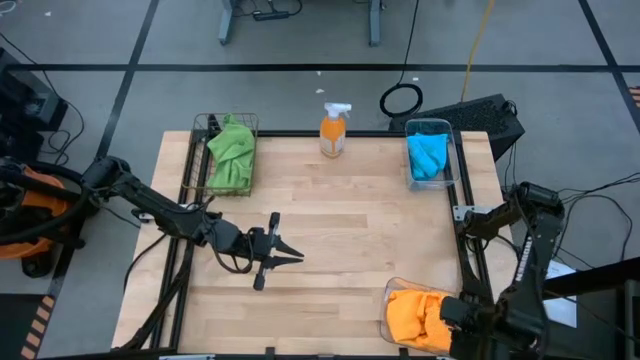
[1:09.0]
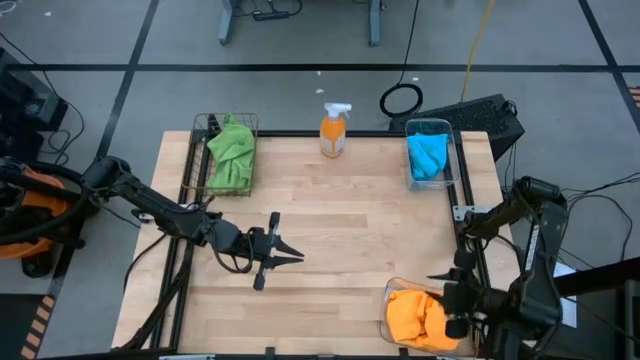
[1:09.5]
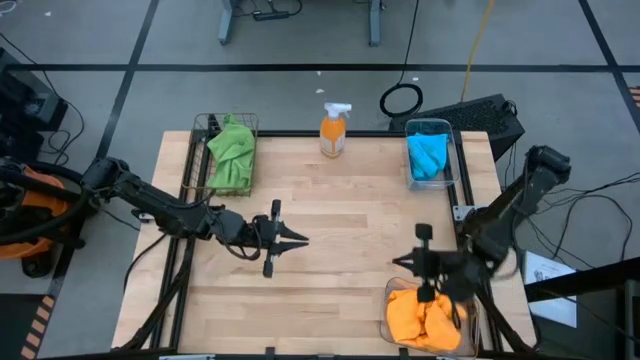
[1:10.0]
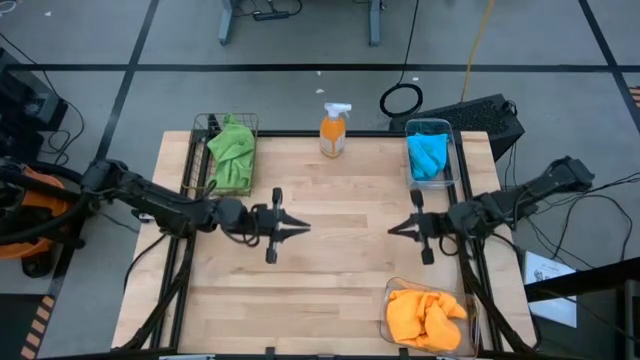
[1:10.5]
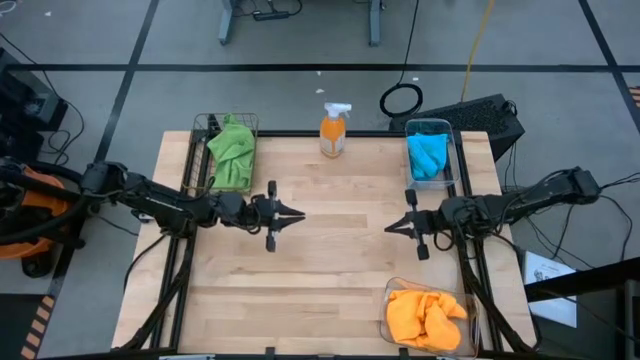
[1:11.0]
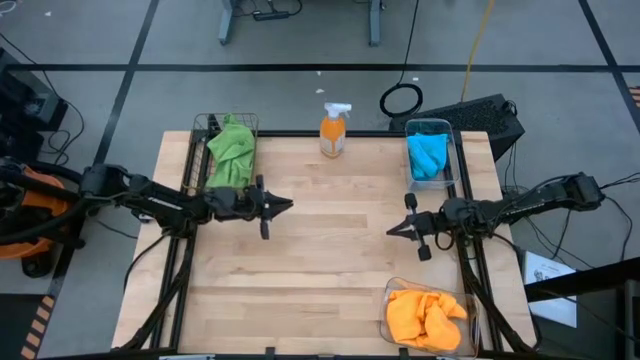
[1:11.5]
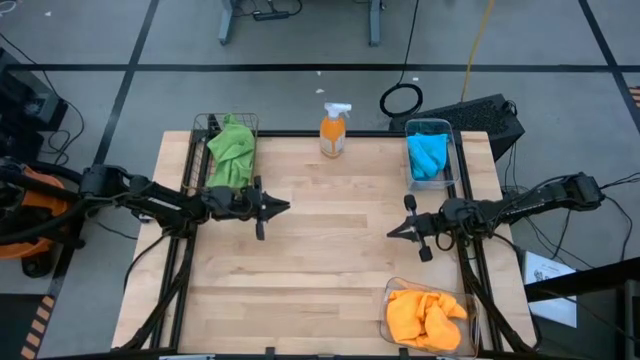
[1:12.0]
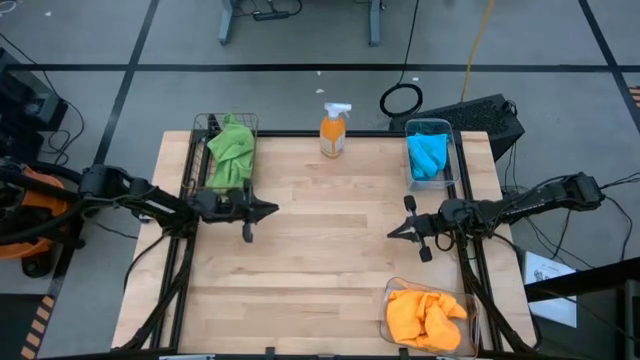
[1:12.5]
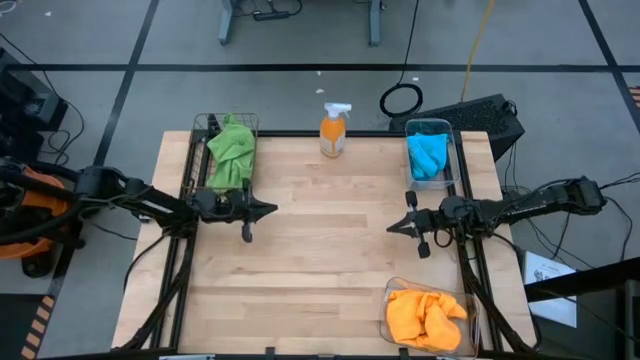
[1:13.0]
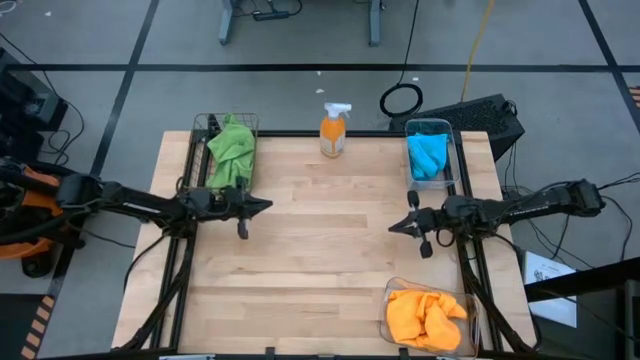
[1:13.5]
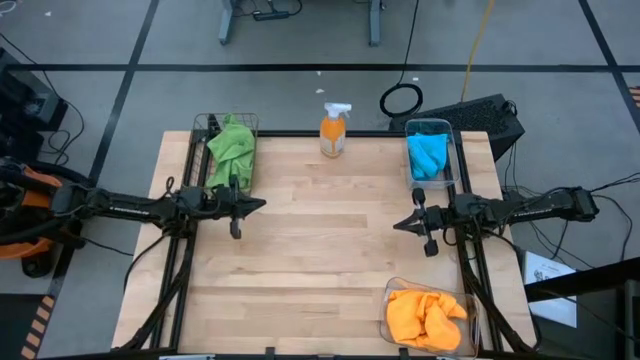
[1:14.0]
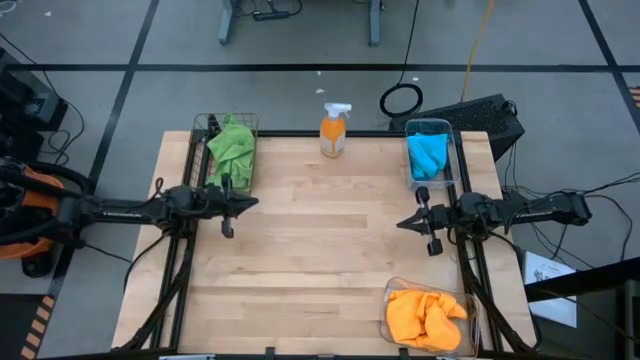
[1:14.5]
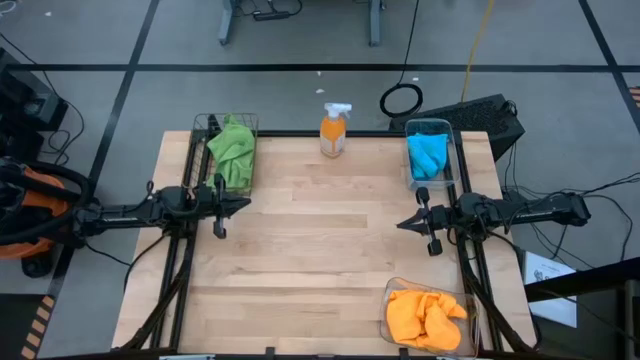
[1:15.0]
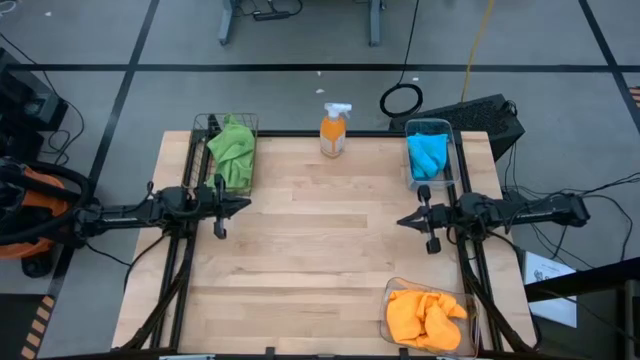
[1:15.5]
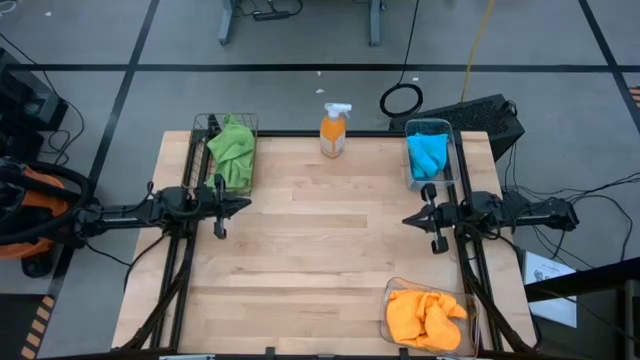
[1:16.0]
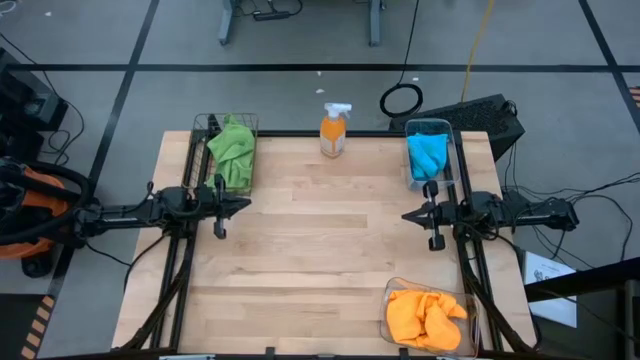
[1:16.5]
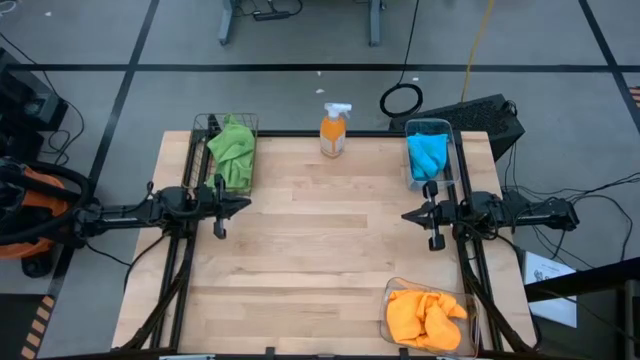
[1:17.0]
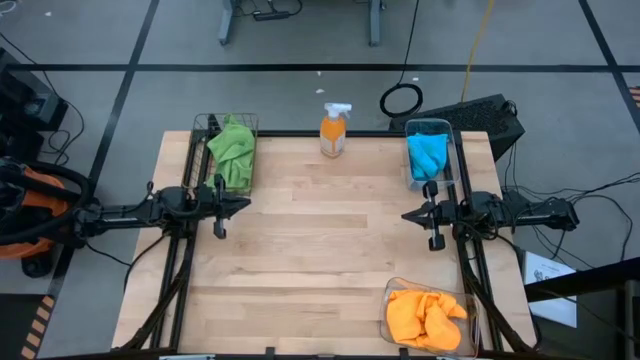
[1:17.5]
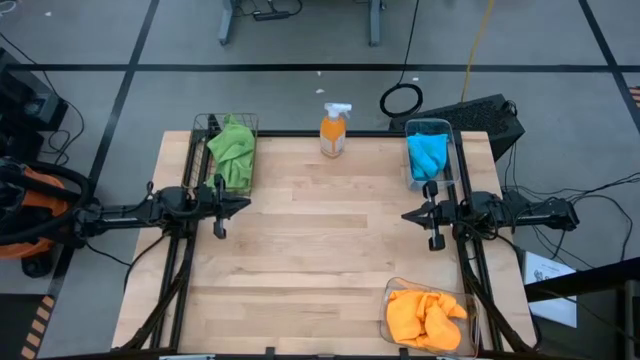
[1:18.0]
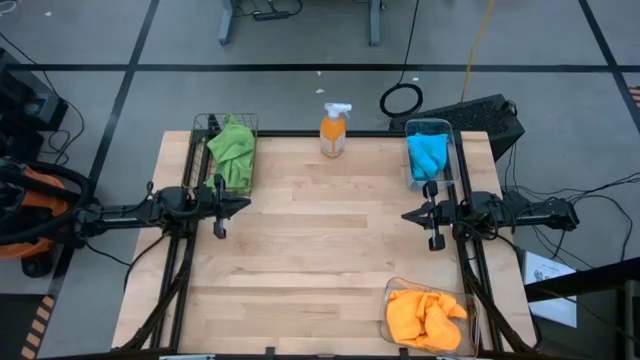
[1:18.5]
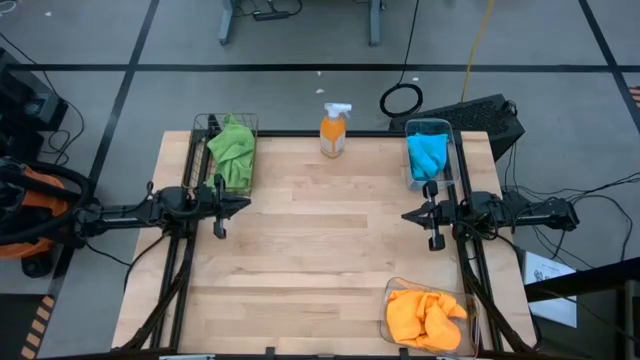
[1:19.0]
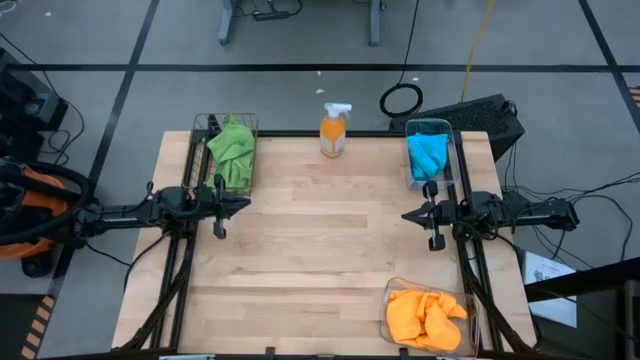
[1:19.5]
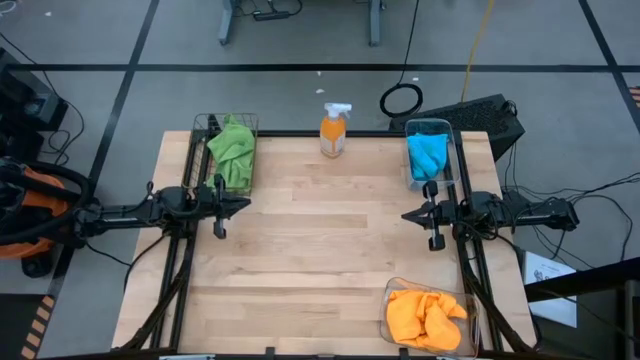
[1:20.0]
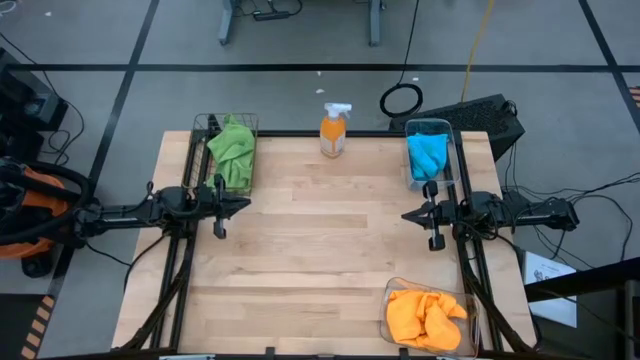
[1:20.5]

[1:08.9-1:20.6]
Task: Sort microfiber towel by color & place in baskets
Return to Home Position

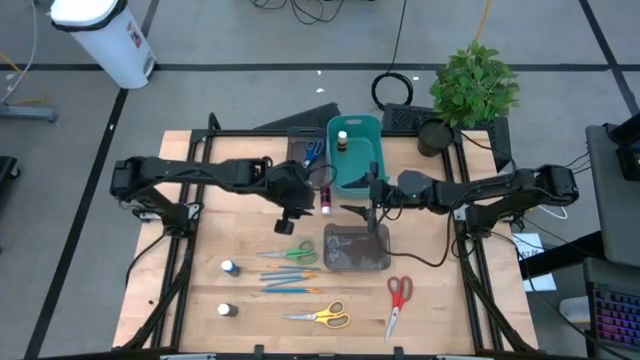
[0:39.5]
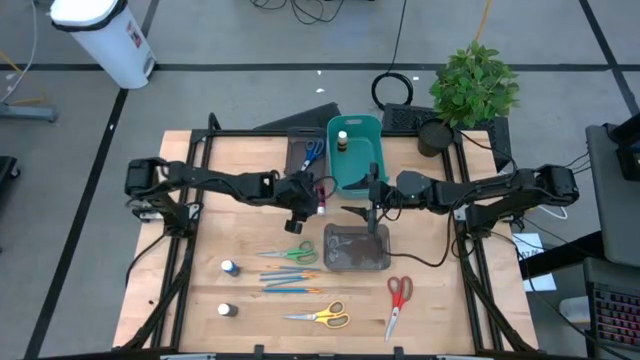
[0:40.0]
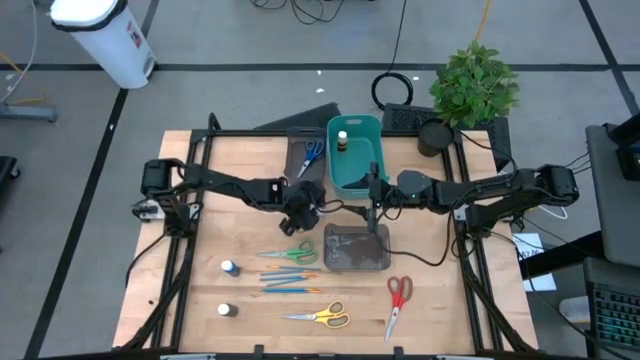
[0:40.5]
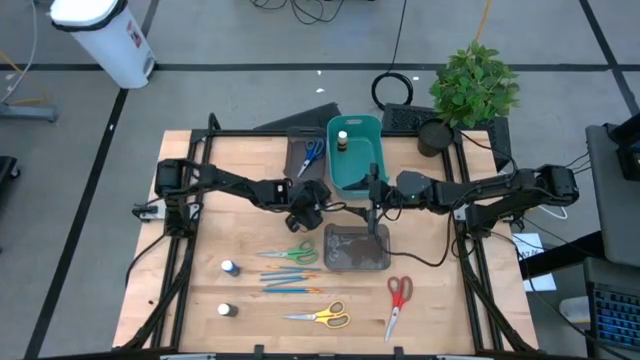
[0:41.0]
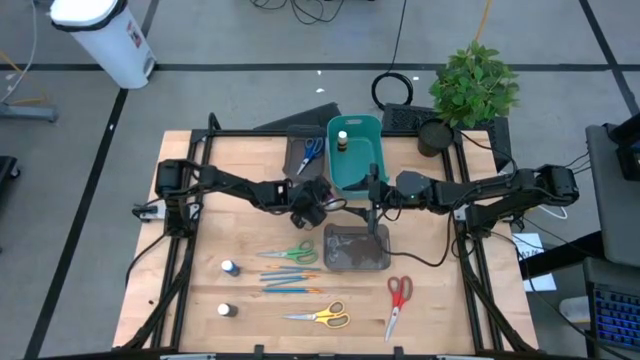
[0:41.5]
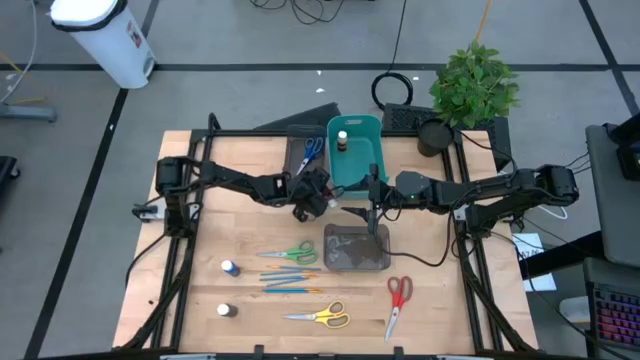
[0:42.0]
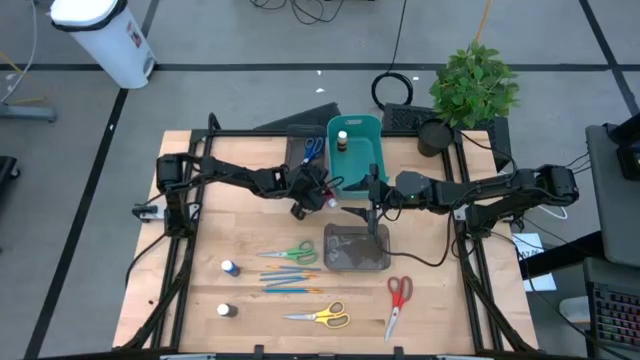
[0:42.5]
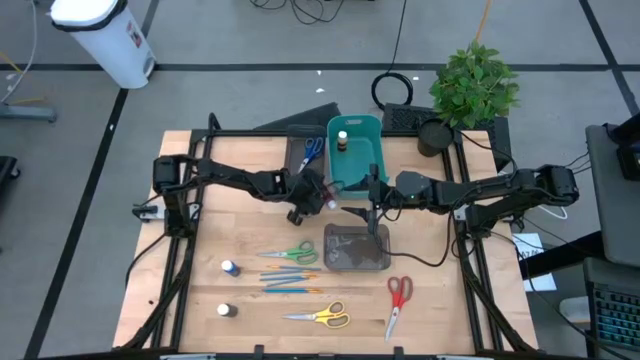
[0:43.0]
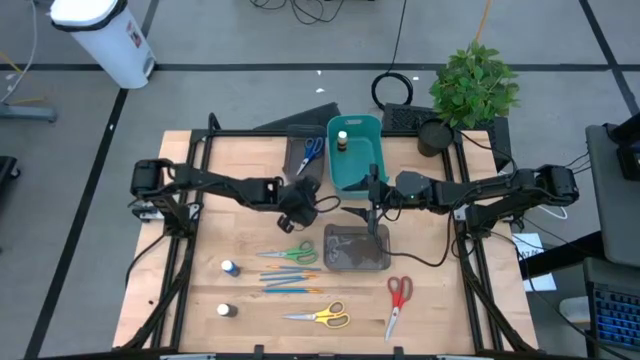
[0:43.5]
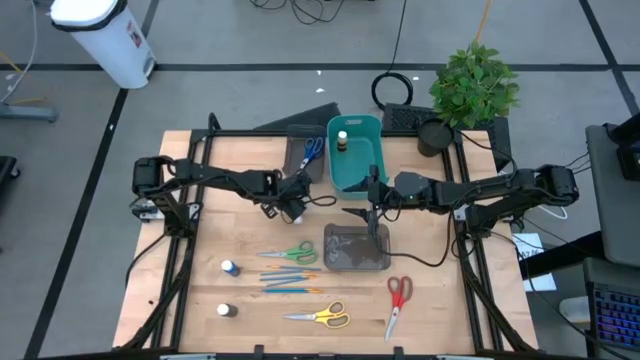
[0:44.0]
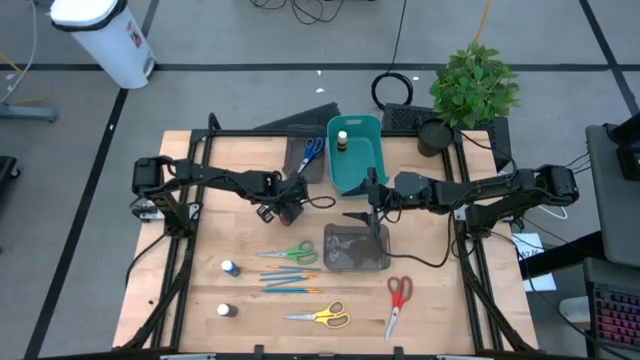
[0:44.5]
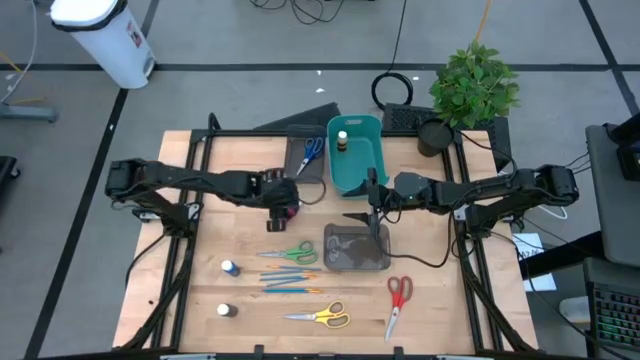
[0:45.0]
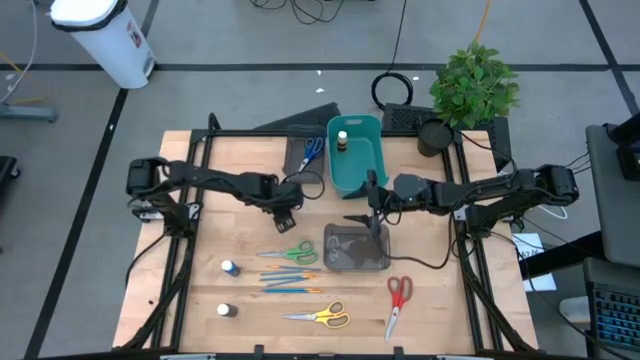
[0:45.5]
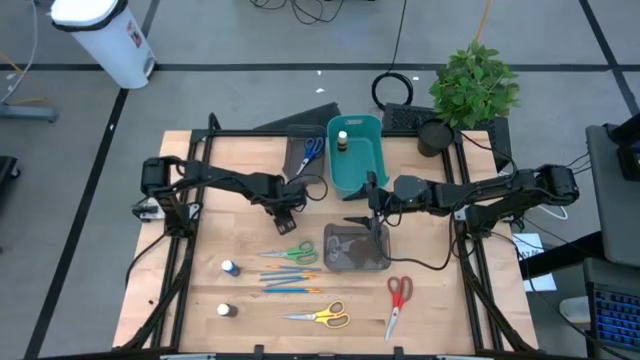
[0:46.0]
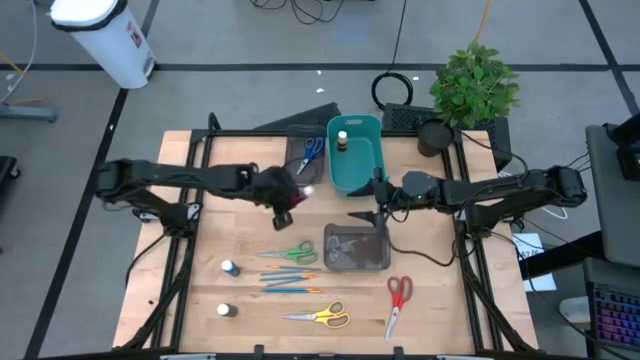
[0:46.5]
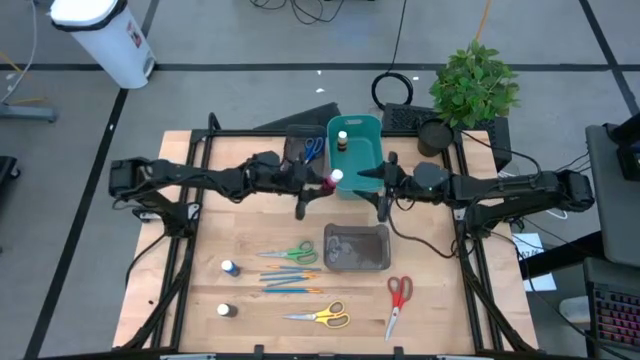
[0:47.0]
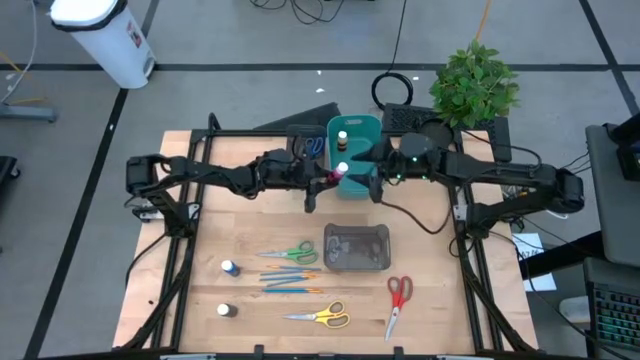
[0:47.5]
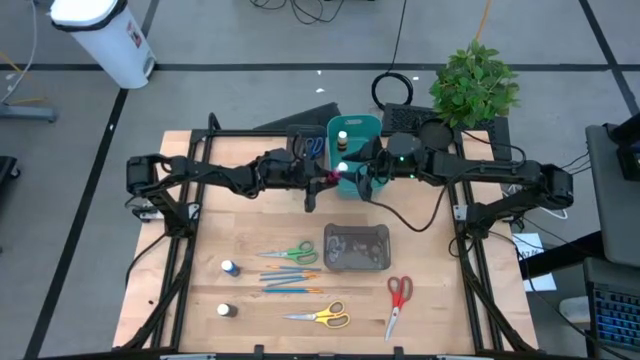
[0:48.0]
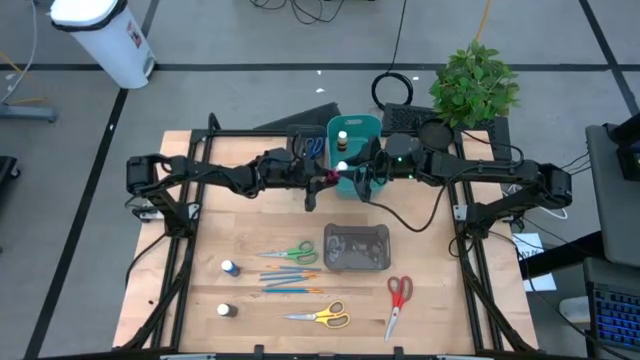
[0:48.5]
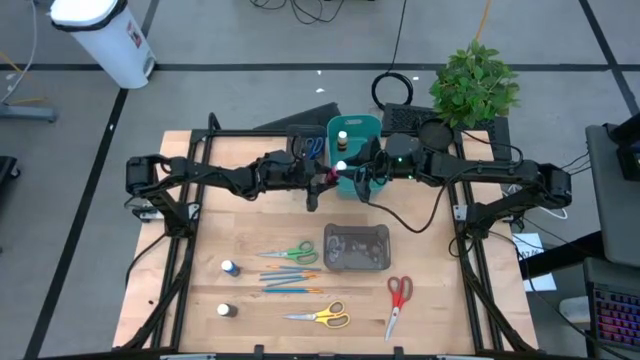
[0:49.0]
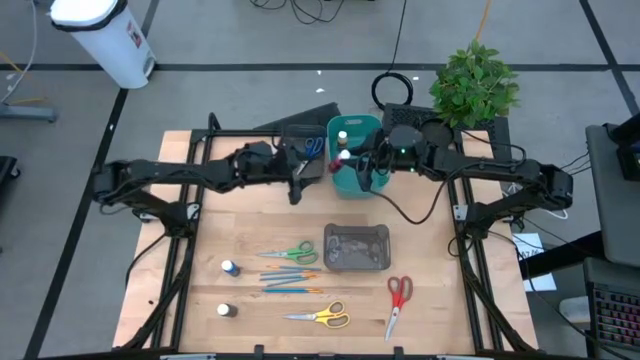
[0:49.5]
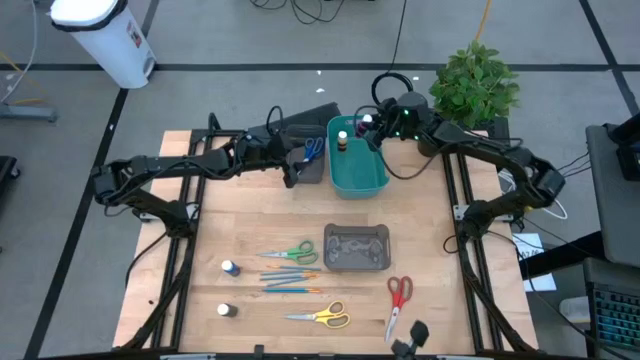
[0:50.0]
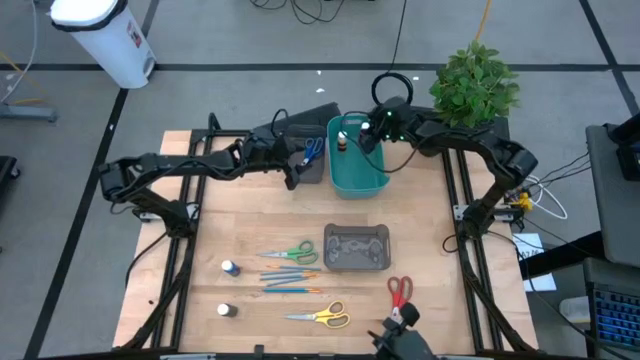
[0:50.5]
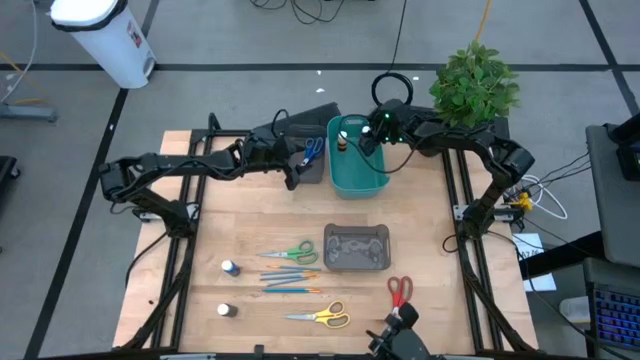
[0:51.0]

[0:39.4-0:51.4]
Task: Pick & Place Paint Supplies
Put the pink paint bottle into the green bin
